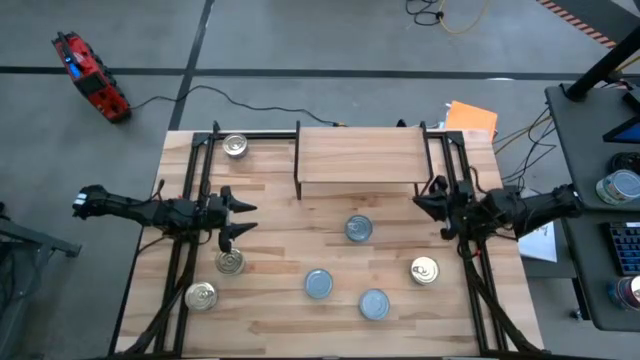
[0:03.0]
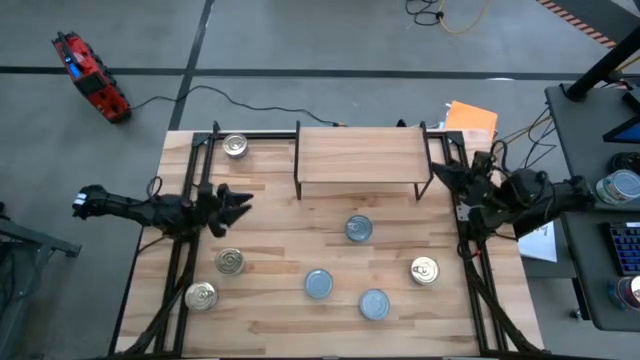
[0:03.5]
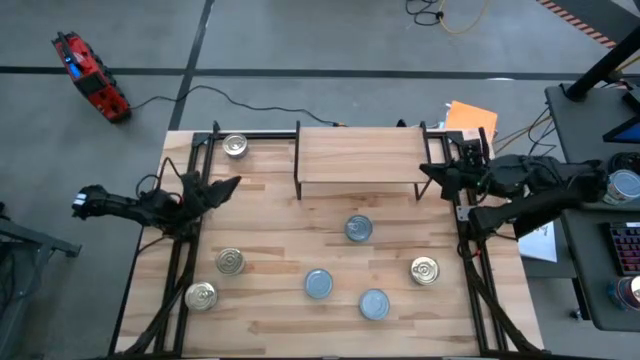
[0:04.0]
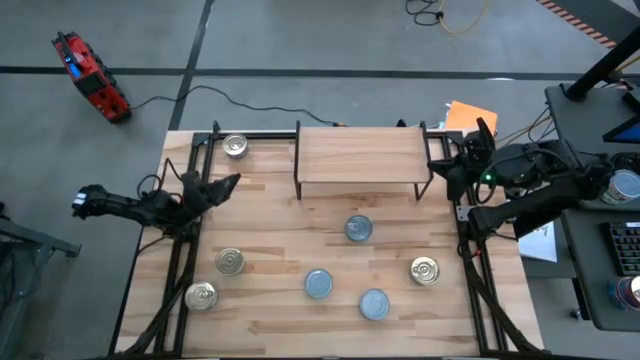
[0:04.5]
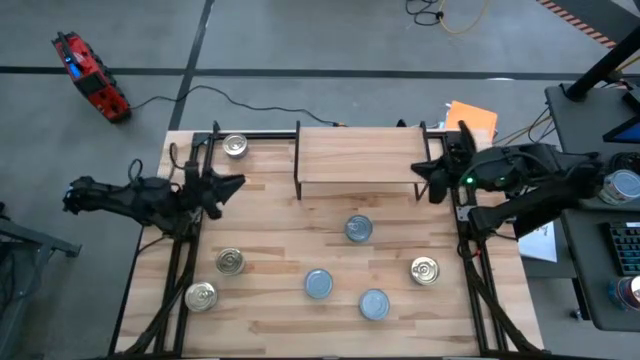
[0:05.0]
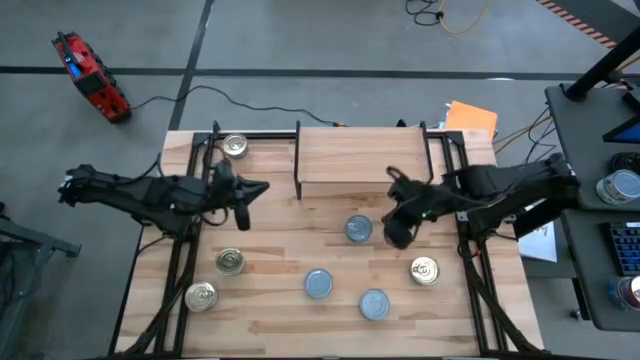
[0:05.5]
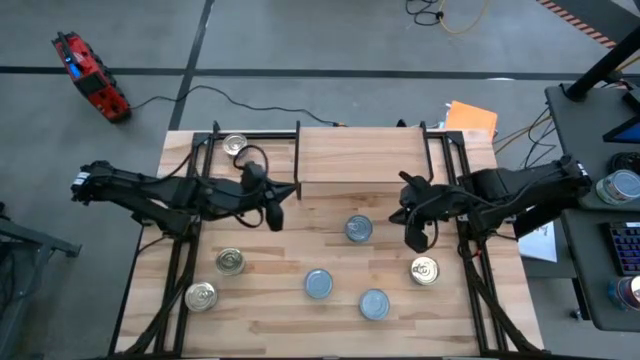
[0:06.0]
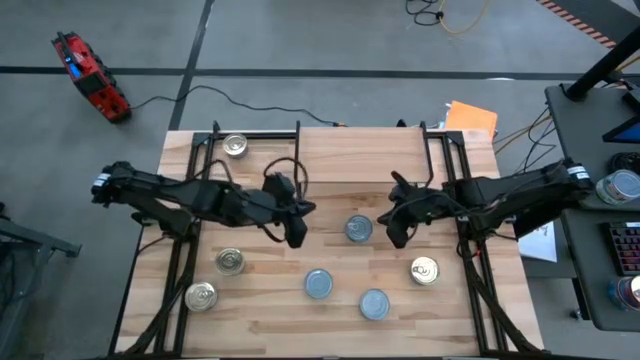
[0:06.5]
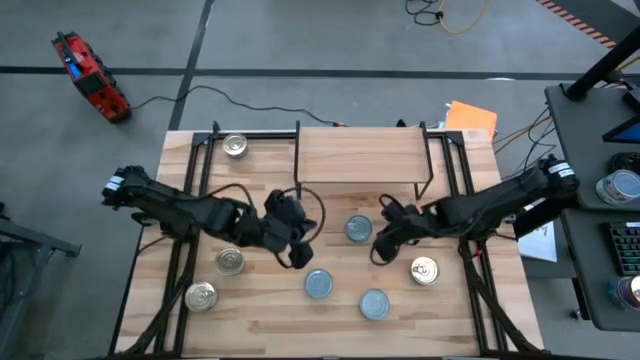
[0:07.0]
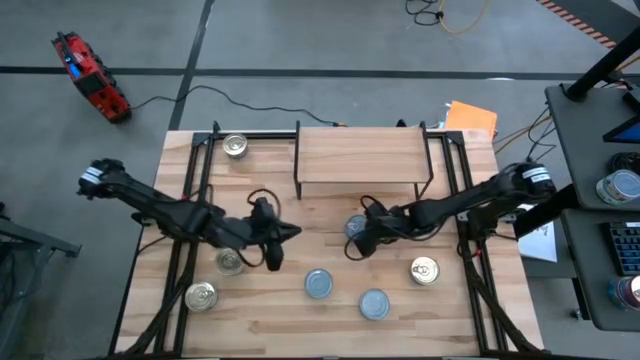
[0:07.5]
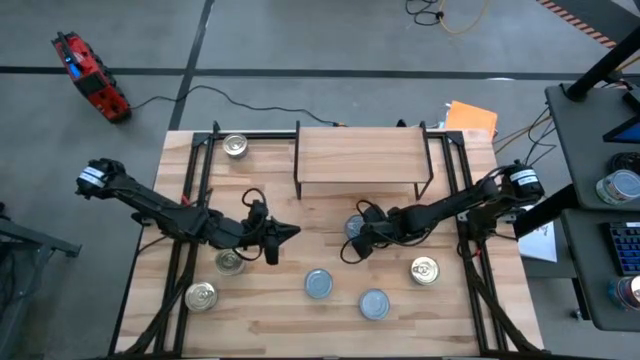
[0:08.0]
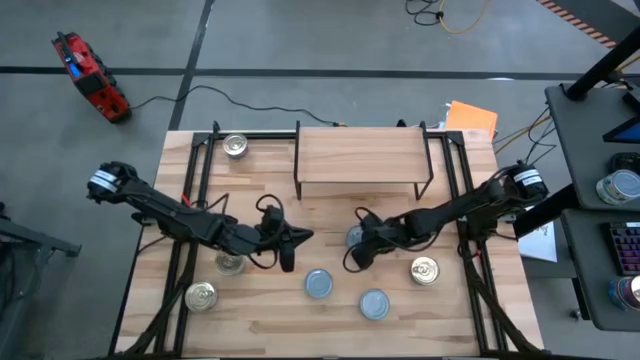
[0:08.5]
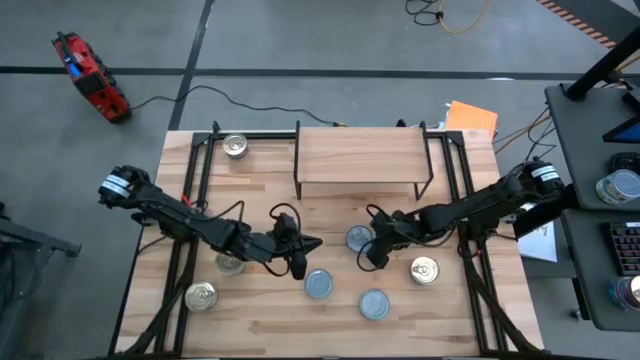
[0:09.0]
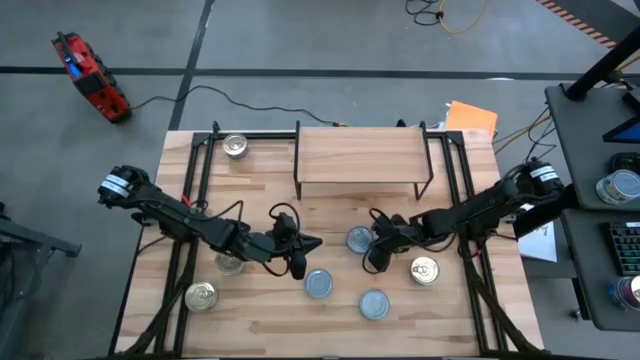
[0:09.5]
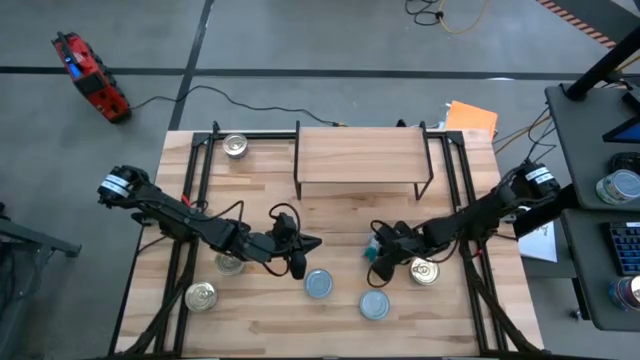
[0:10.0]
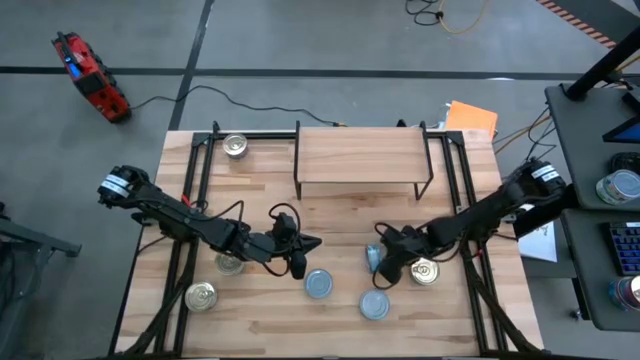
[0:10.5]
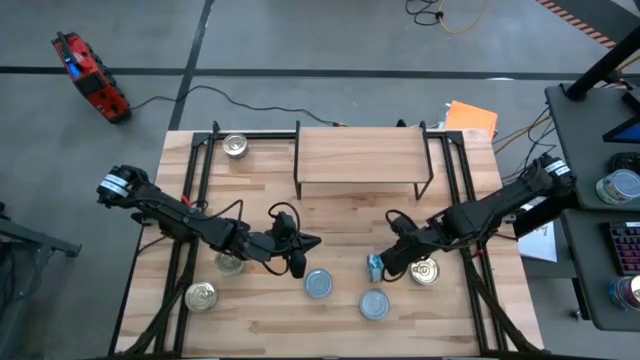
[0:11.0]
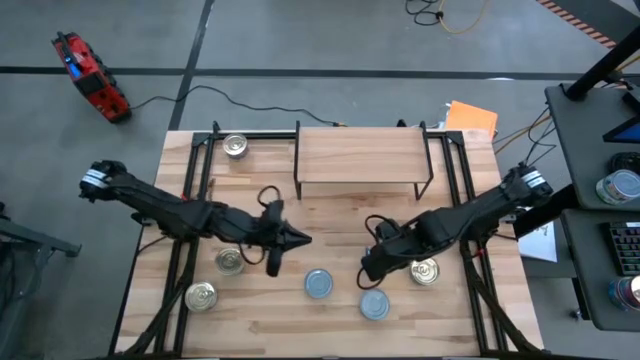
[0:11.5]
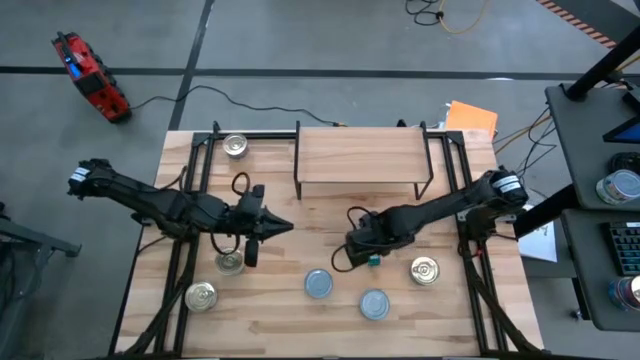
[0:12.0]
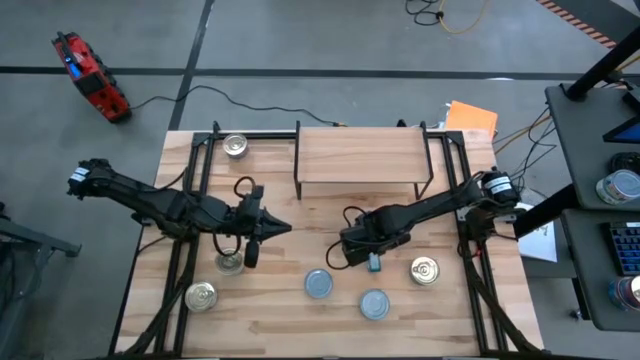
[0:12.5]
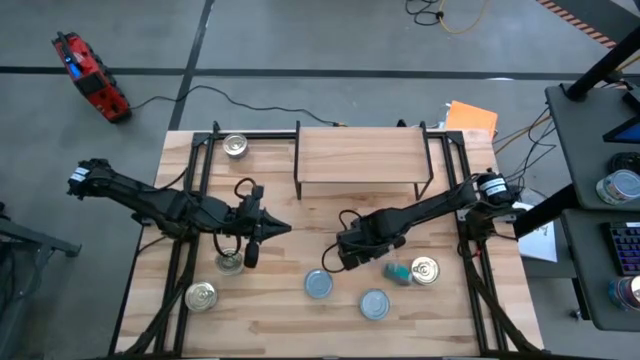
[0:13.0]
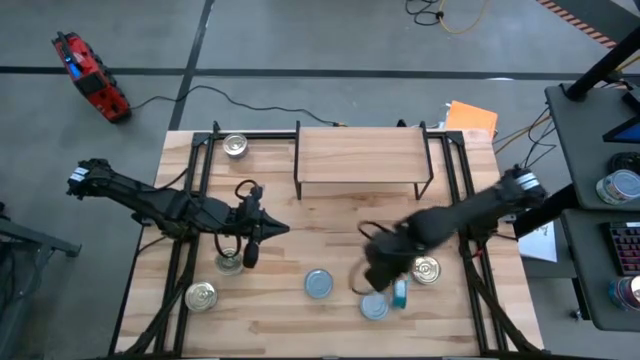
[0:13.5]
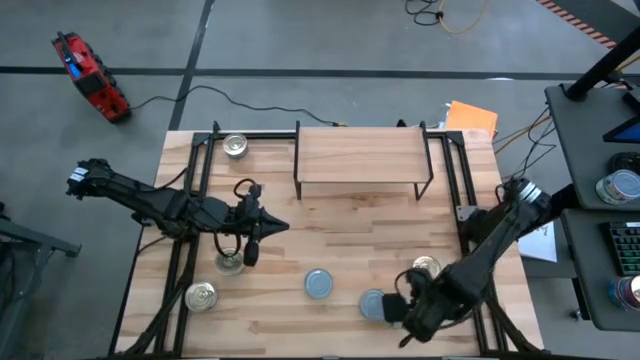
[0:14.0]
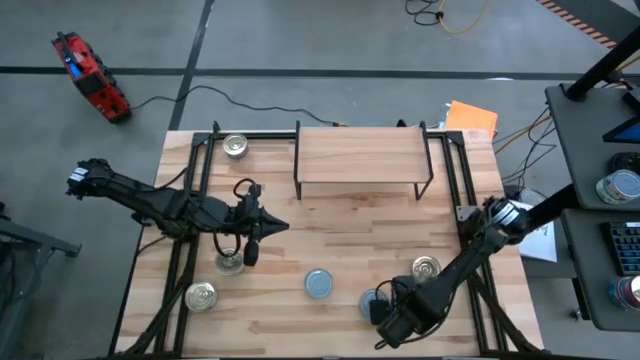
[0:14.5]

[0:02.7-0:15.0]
Task: Stack canned seafood by type on shelf
Put the blue tuna can on the shelf

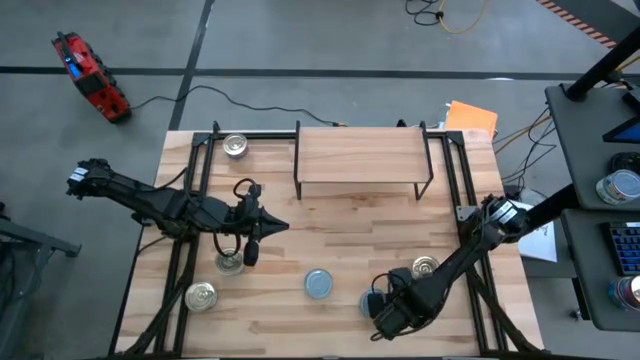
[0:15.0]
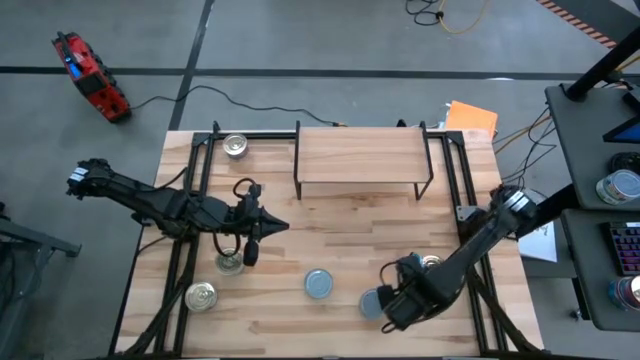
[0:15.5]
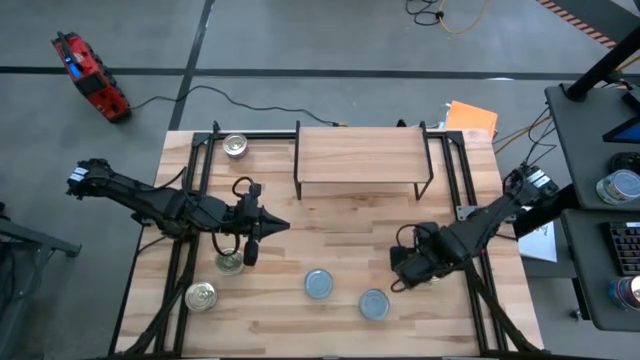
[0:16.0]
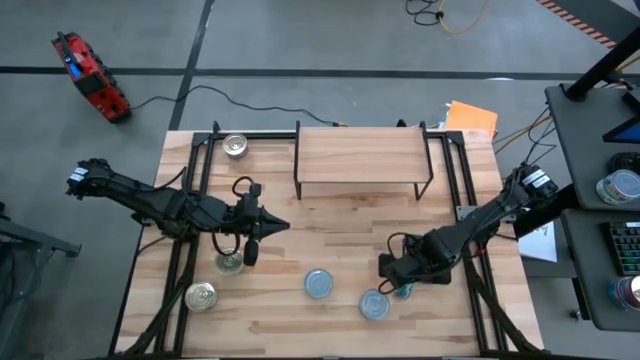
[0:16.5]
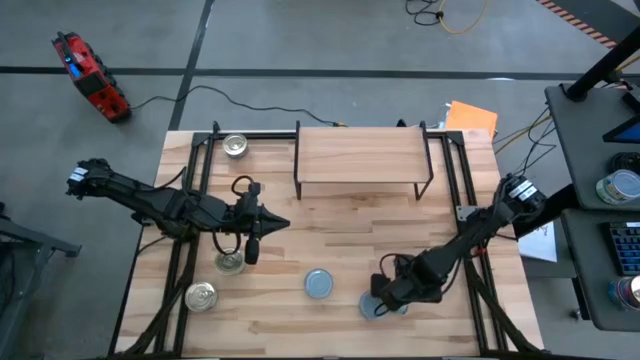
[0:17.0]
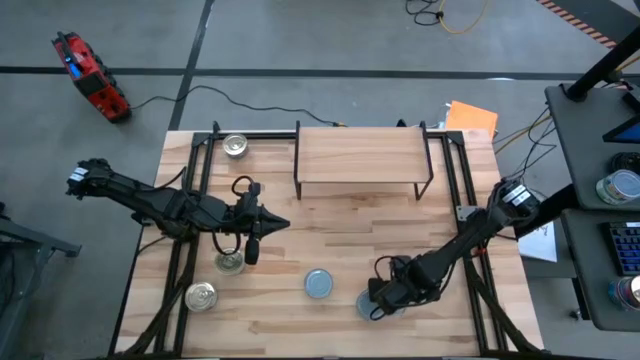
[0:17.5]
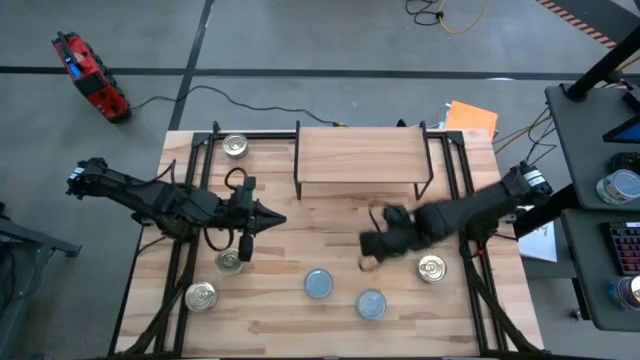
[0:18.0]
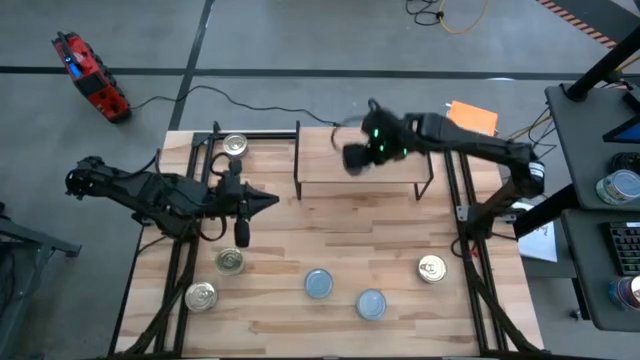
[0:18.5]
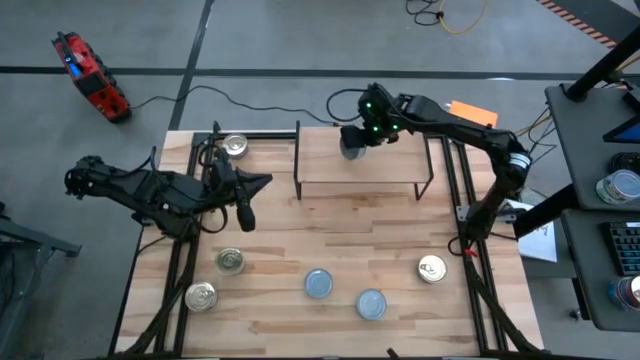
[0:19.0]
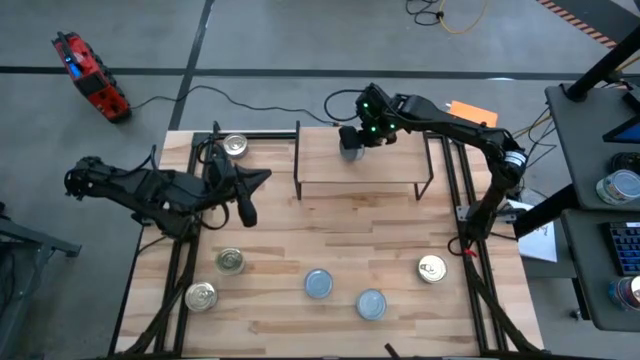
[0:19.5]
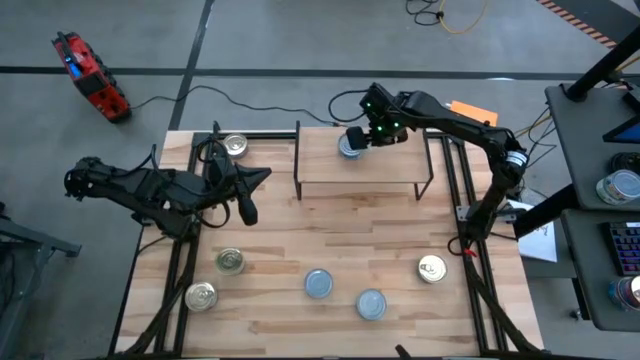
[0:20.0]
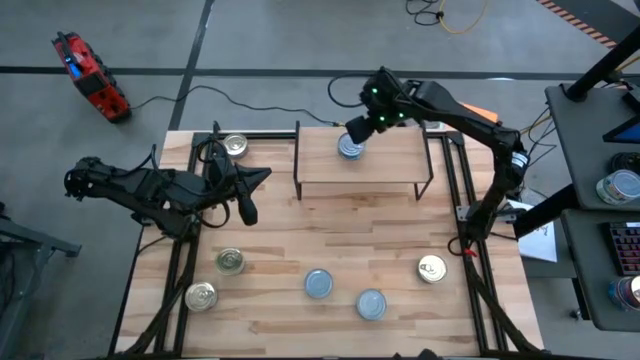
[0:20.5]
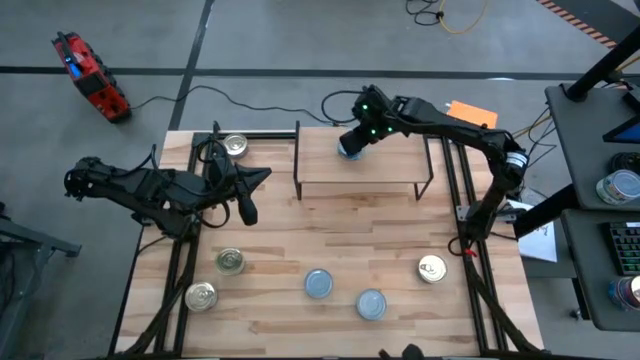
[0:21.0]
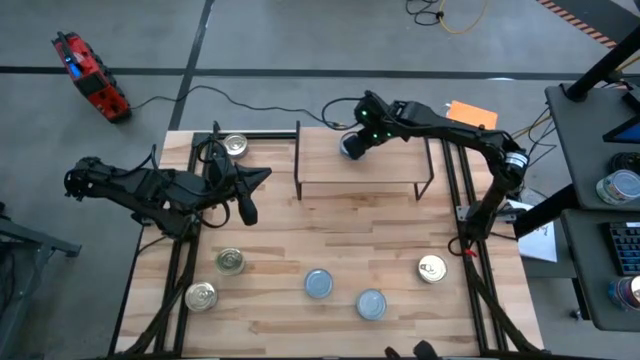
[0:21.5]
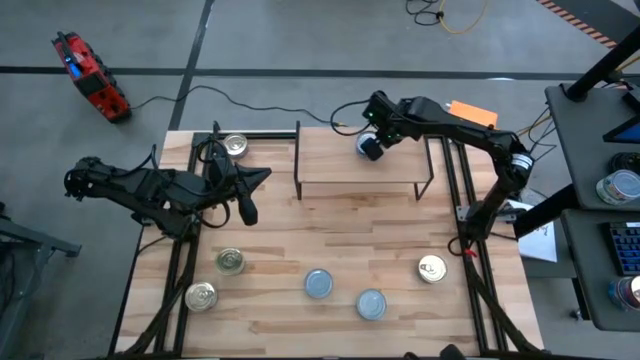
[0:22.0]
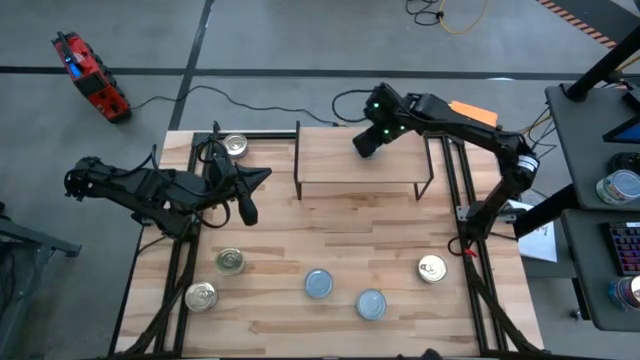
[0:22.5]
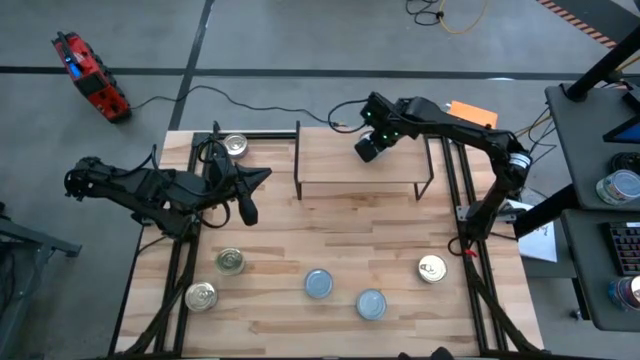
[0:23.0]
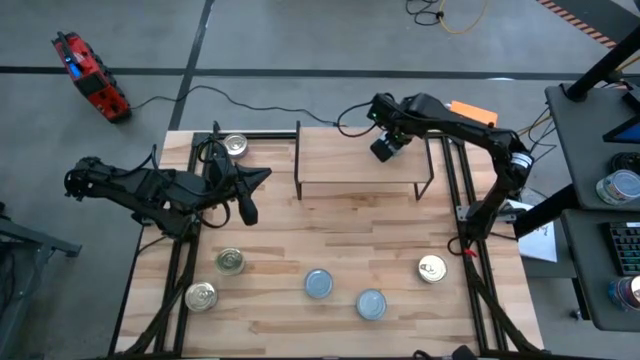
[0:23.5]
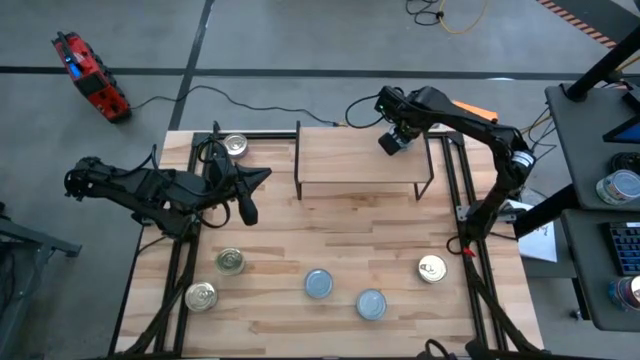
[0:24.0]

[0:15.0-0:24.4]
Put the blue tuna can on the shelf
